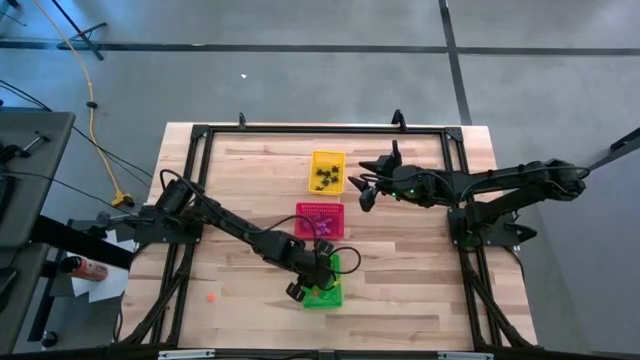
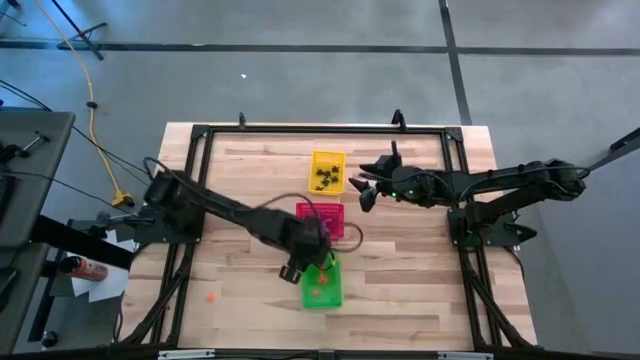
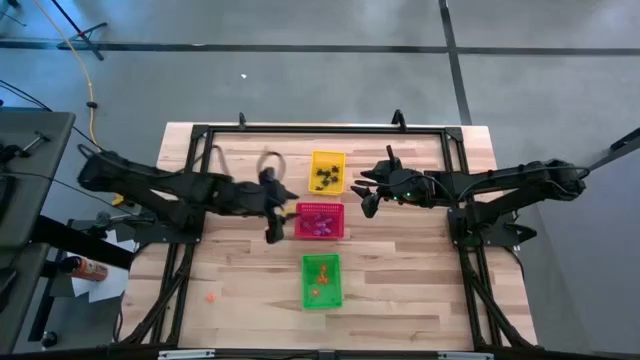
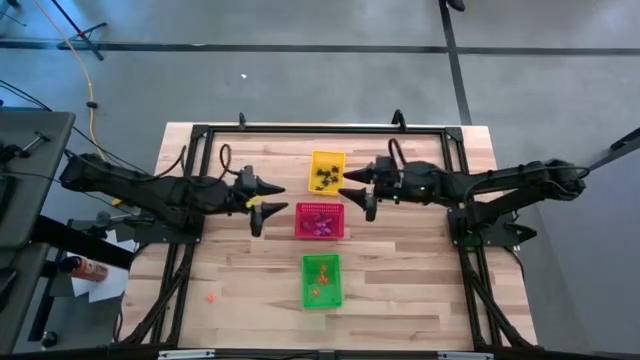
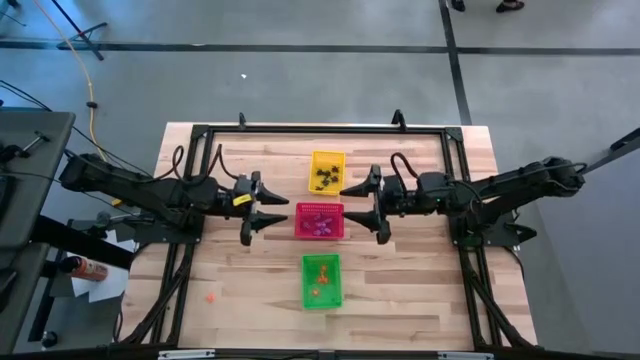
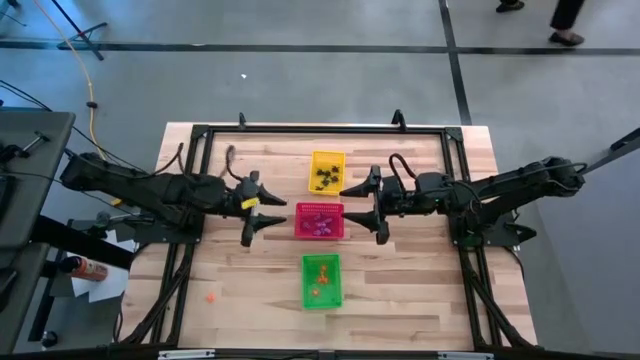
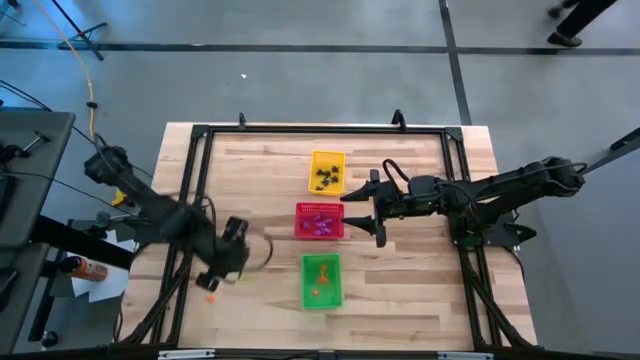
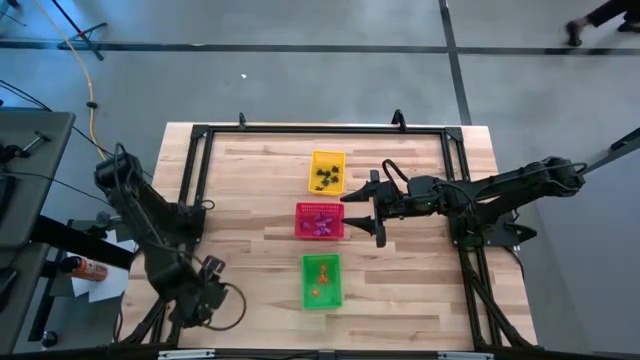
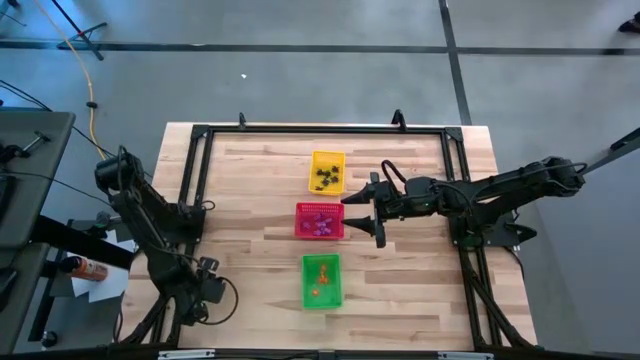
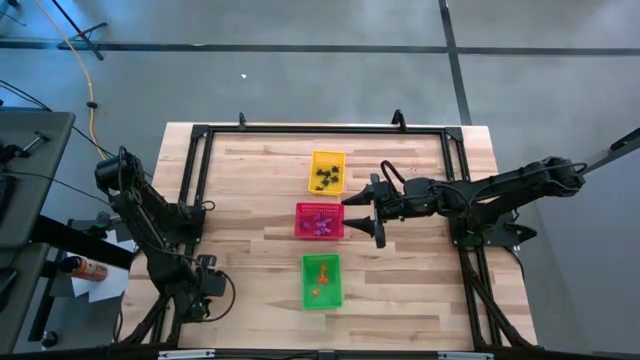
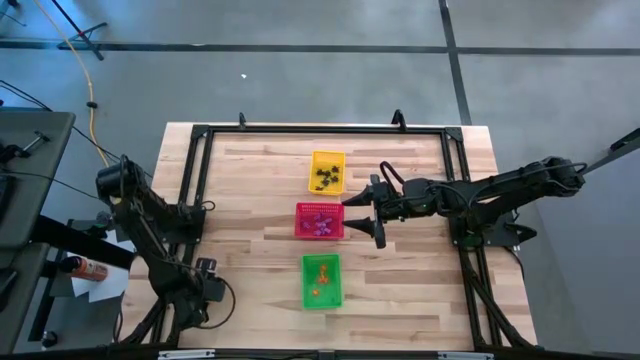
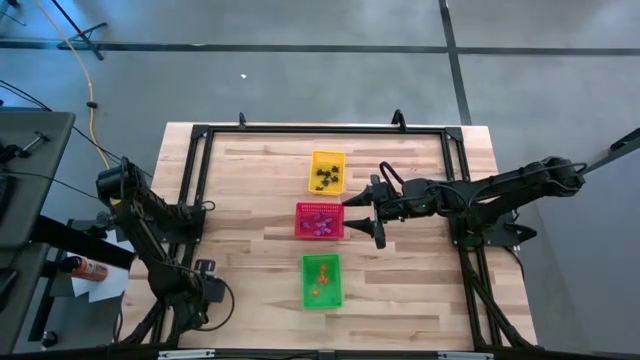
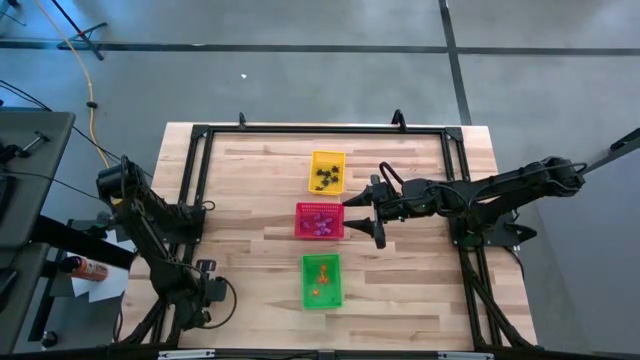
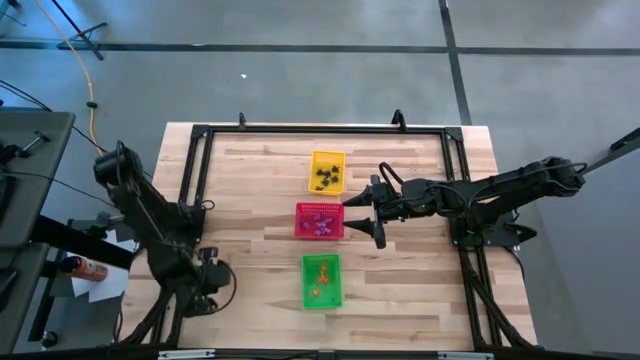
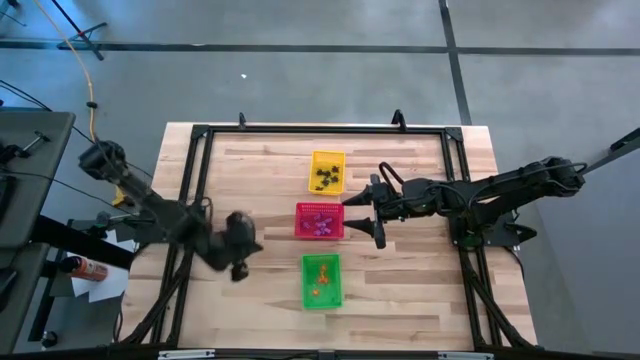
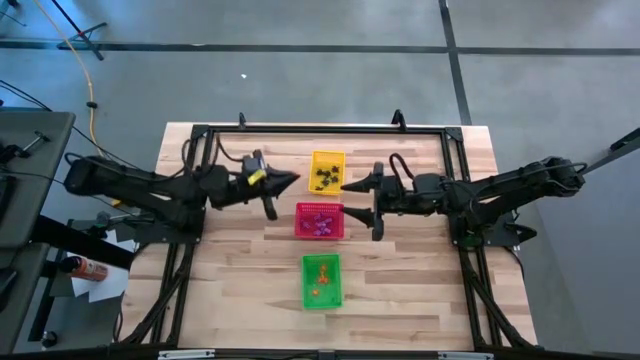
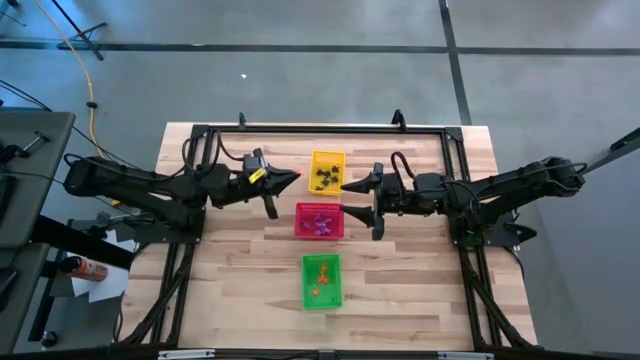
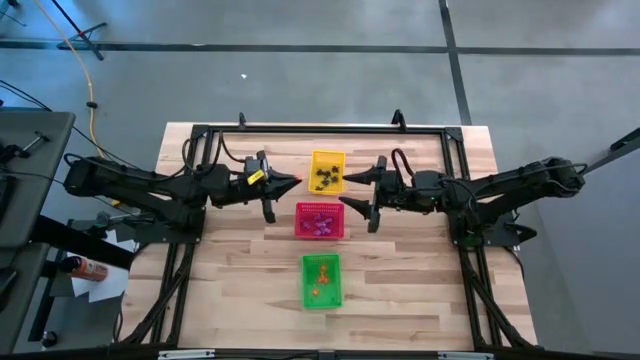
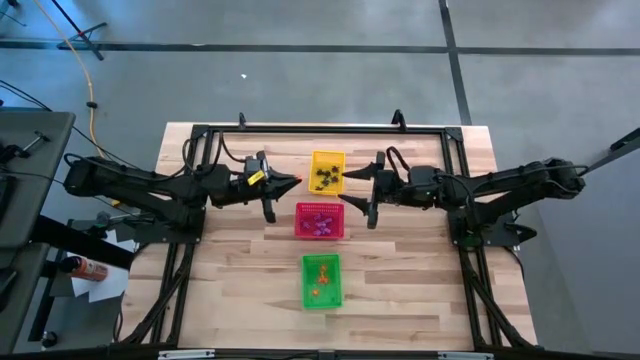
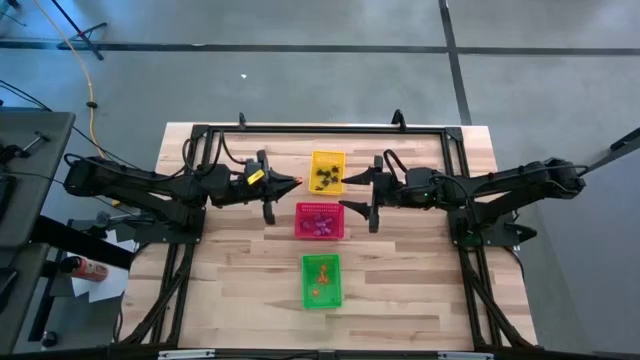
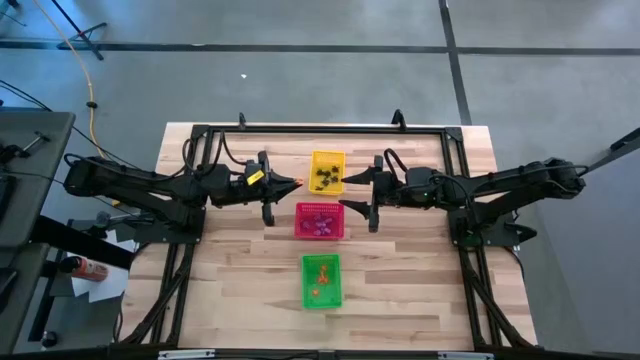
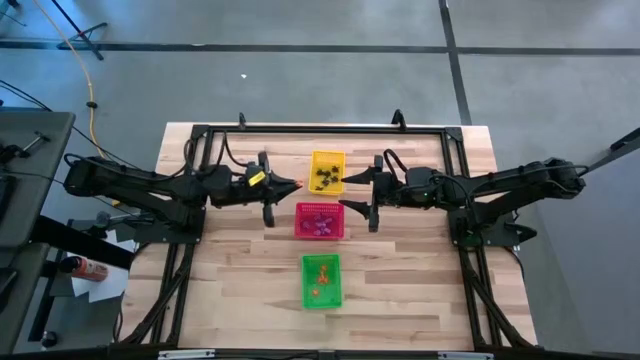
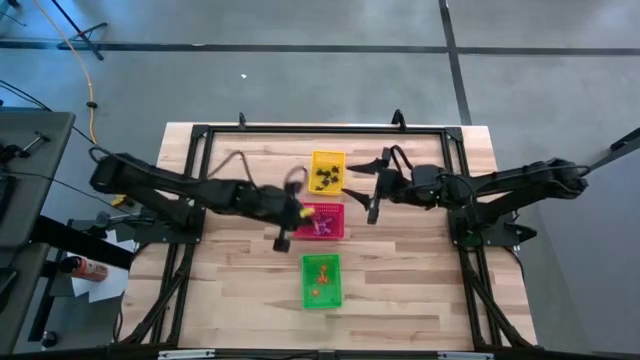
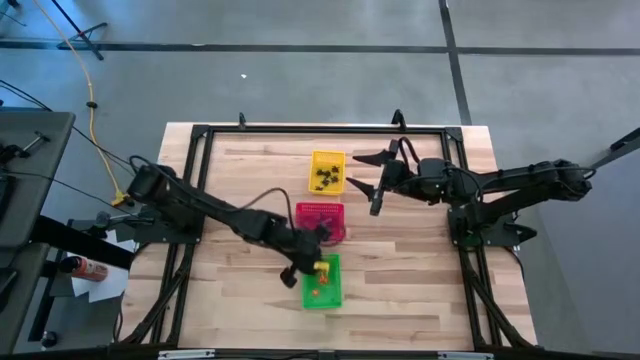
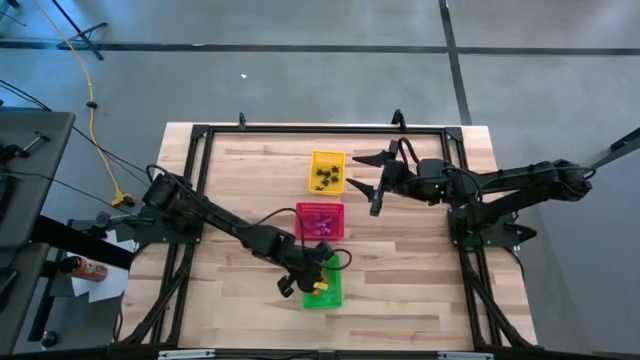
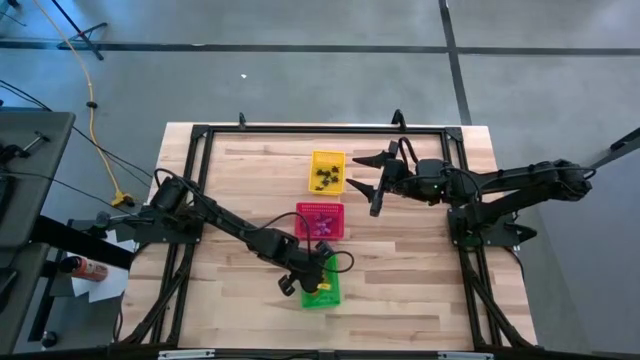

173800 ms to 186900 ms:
Task: Sort Halloween decoration
Put the orange spider toy into the green bin
